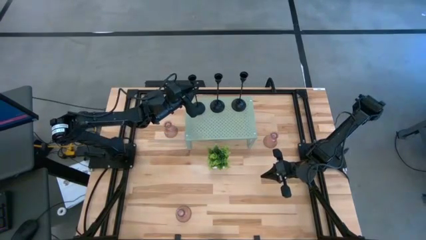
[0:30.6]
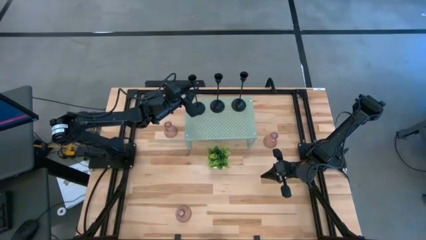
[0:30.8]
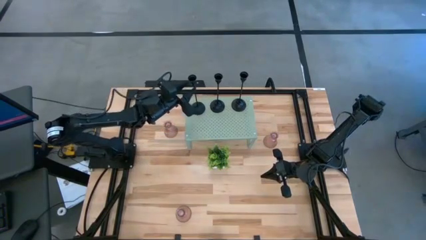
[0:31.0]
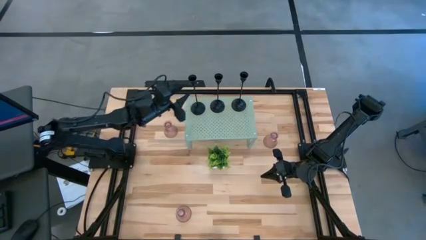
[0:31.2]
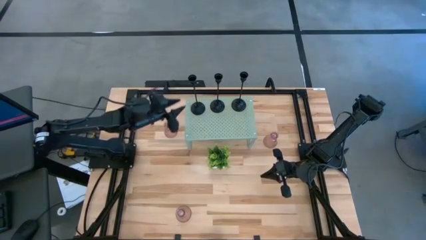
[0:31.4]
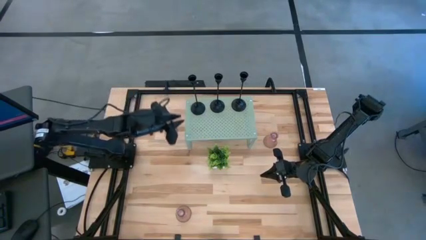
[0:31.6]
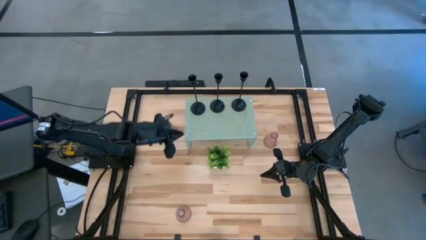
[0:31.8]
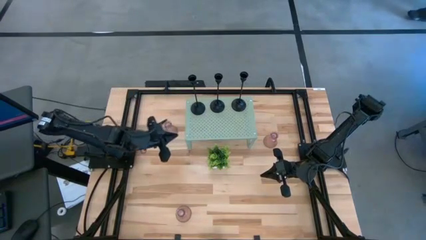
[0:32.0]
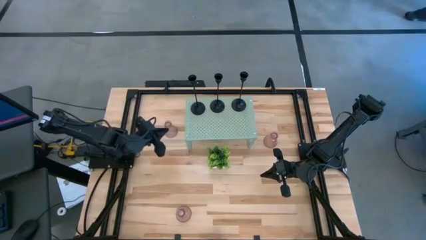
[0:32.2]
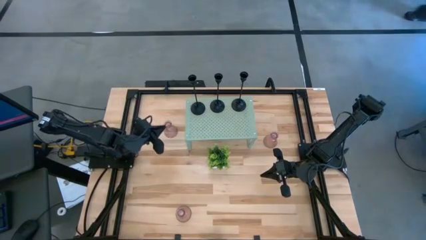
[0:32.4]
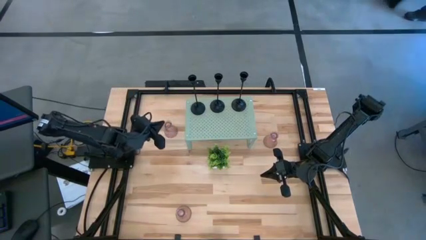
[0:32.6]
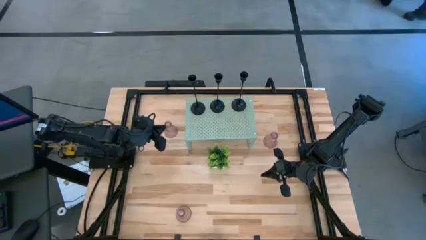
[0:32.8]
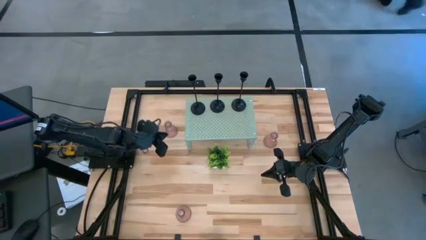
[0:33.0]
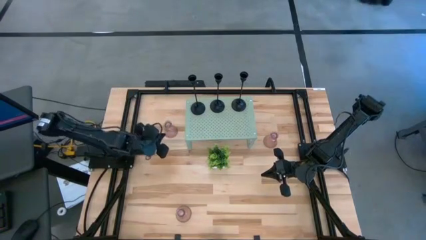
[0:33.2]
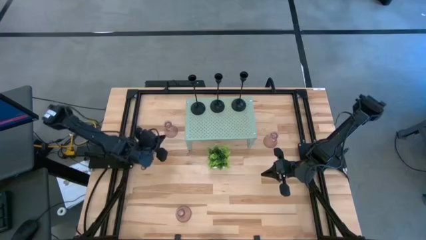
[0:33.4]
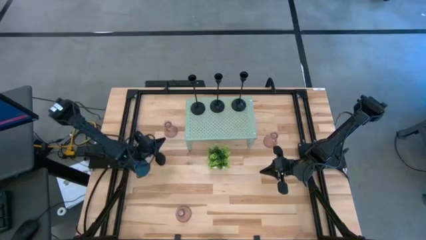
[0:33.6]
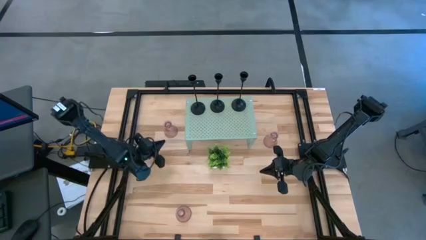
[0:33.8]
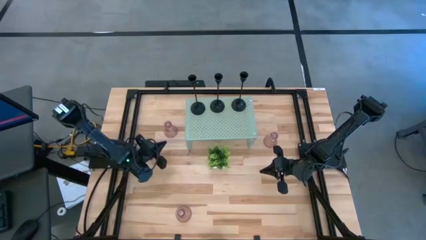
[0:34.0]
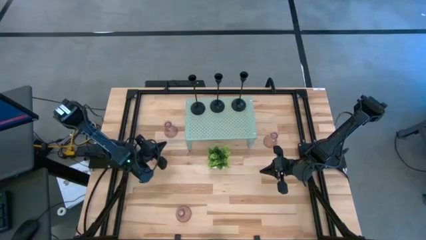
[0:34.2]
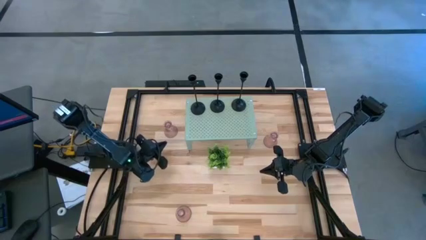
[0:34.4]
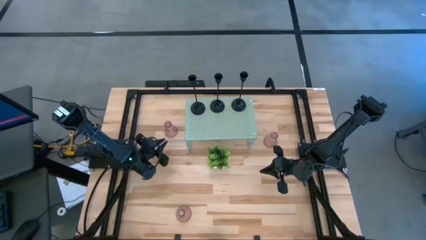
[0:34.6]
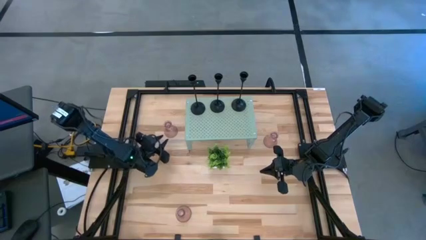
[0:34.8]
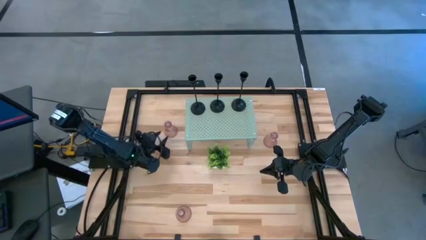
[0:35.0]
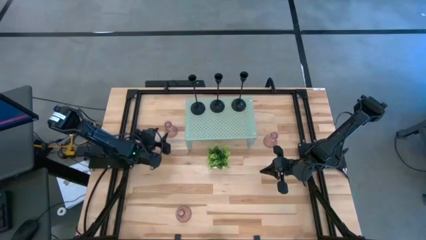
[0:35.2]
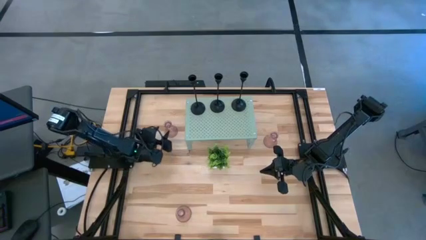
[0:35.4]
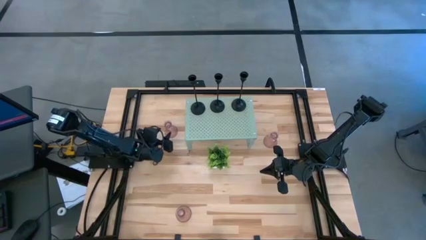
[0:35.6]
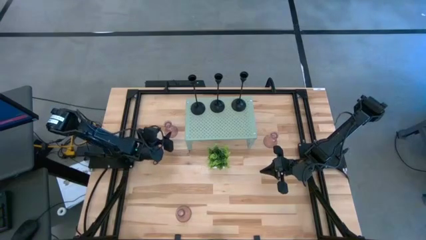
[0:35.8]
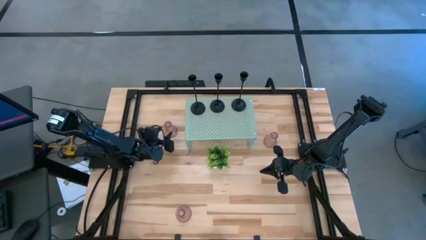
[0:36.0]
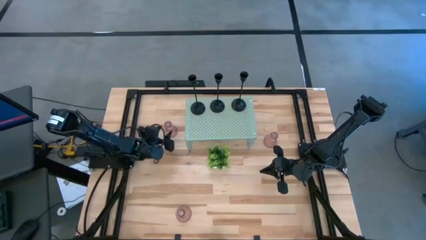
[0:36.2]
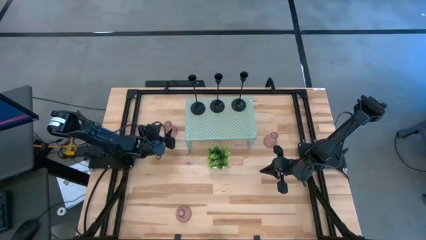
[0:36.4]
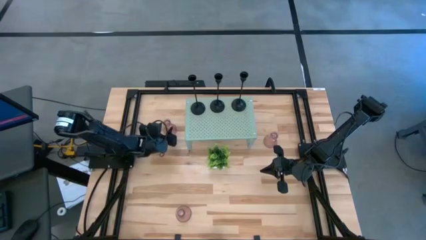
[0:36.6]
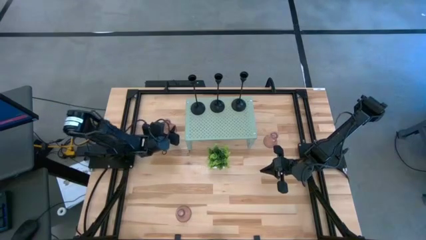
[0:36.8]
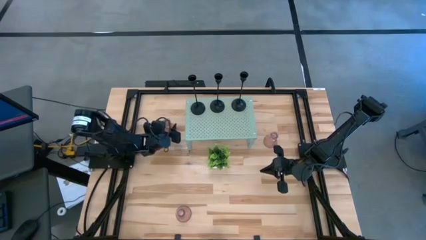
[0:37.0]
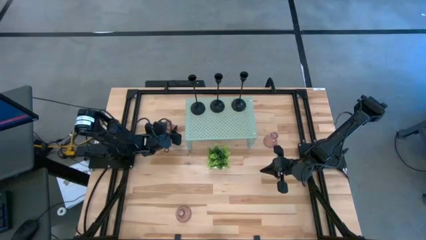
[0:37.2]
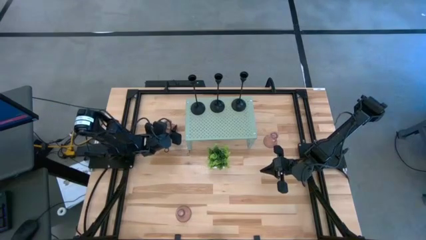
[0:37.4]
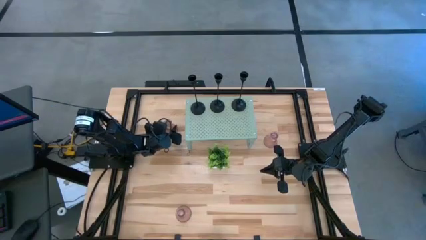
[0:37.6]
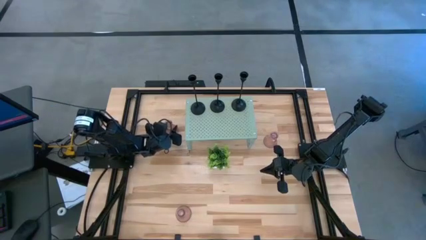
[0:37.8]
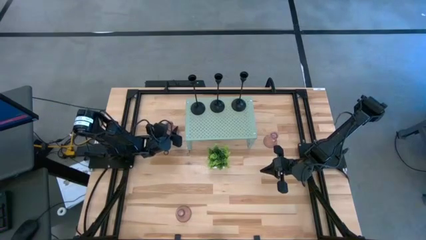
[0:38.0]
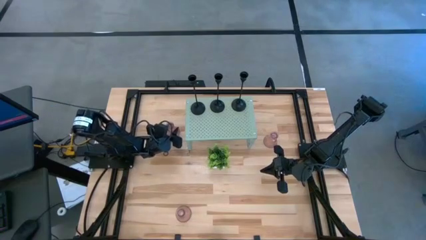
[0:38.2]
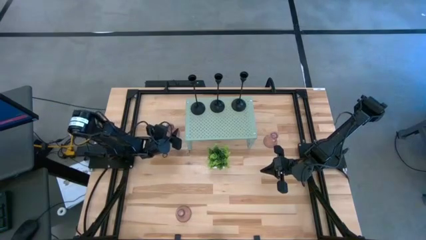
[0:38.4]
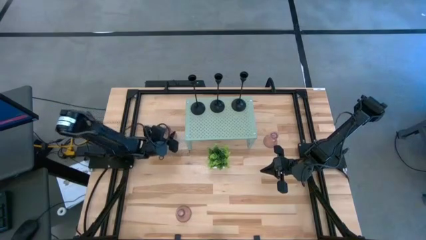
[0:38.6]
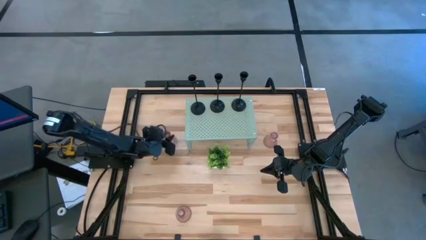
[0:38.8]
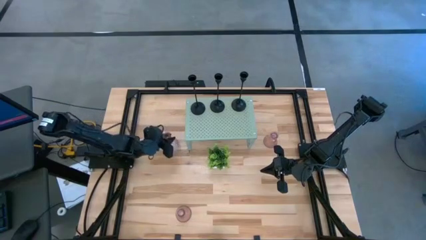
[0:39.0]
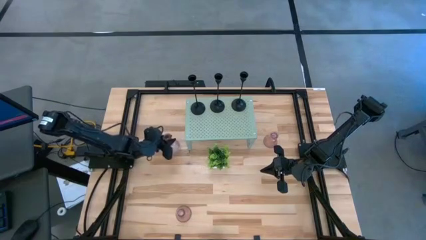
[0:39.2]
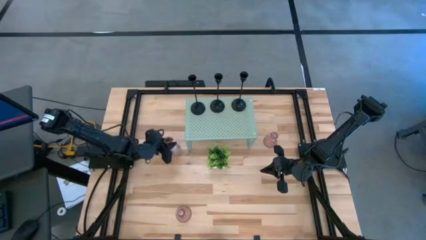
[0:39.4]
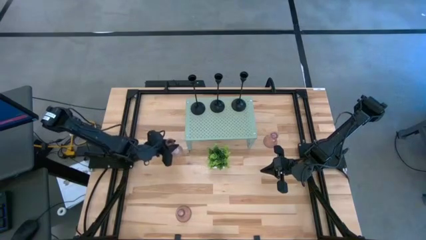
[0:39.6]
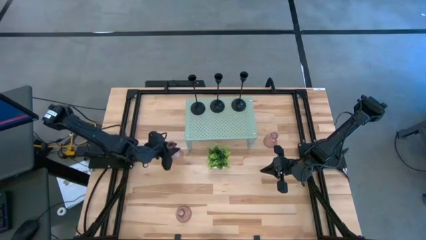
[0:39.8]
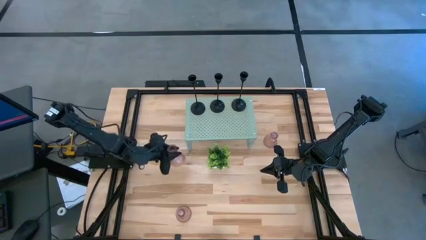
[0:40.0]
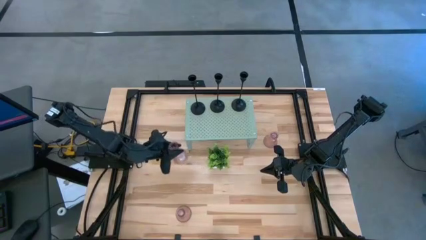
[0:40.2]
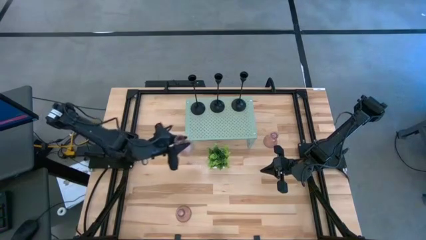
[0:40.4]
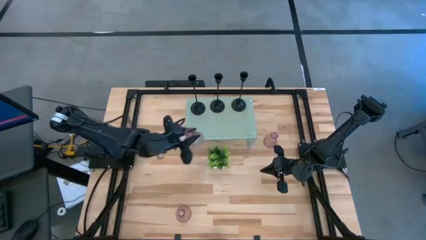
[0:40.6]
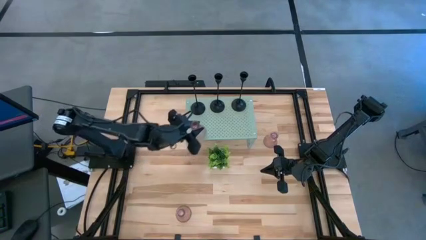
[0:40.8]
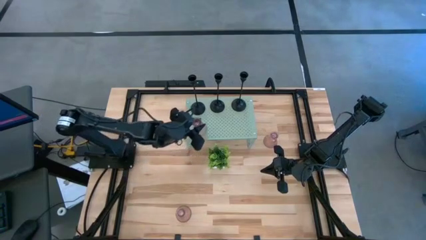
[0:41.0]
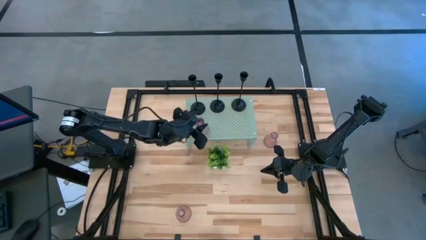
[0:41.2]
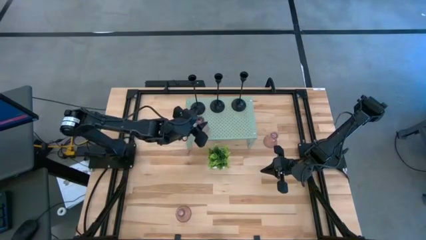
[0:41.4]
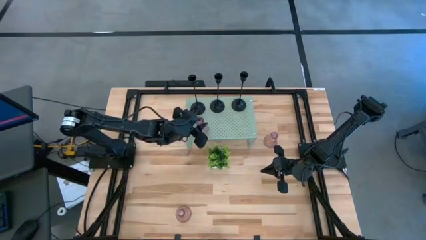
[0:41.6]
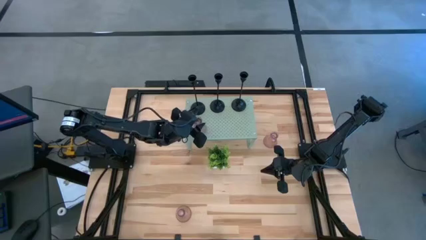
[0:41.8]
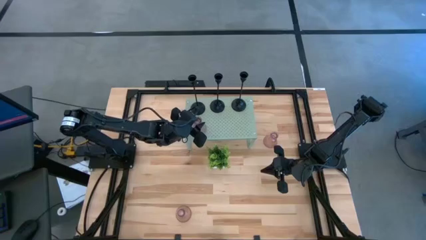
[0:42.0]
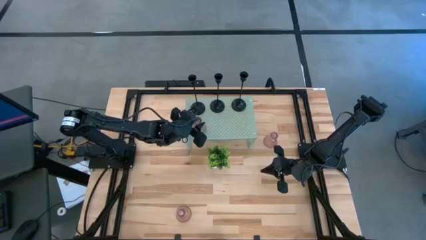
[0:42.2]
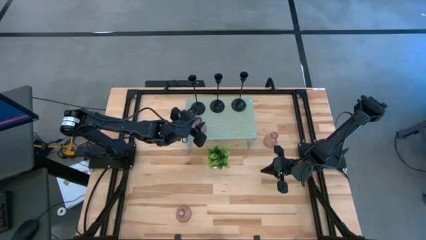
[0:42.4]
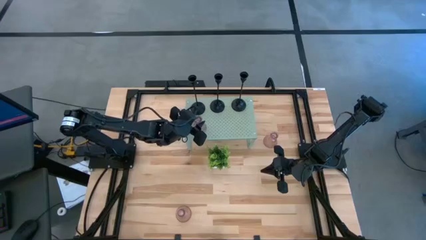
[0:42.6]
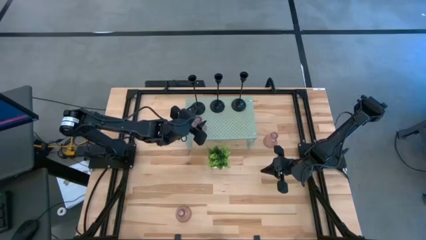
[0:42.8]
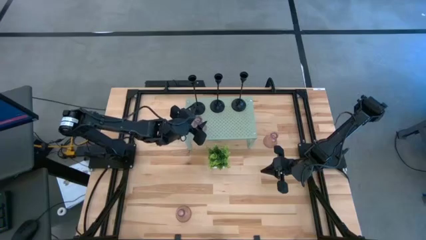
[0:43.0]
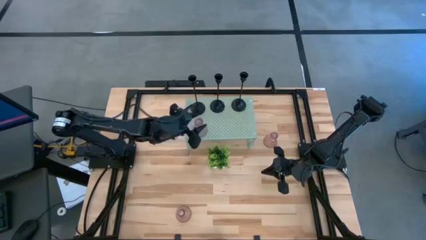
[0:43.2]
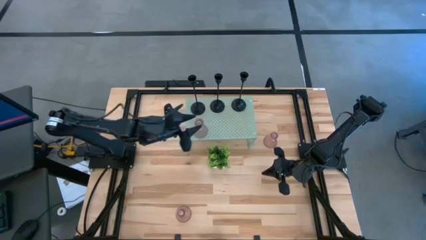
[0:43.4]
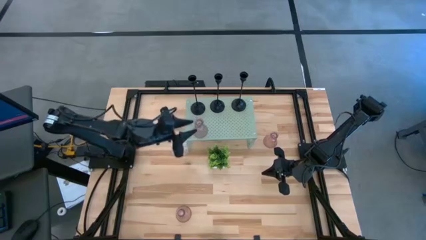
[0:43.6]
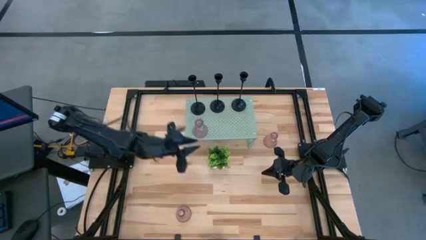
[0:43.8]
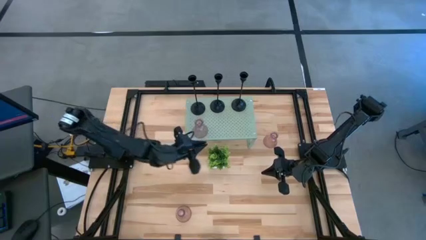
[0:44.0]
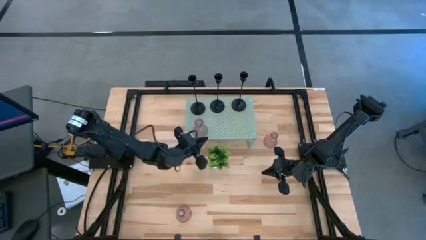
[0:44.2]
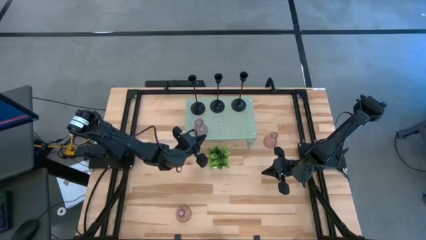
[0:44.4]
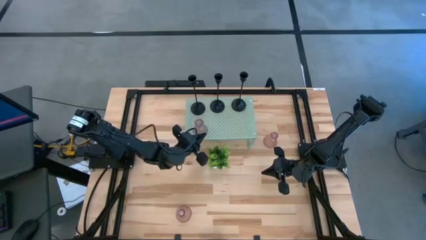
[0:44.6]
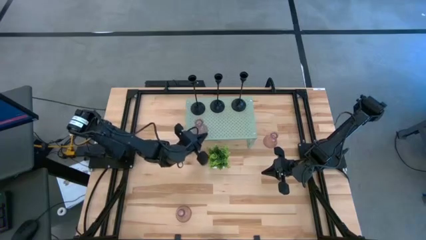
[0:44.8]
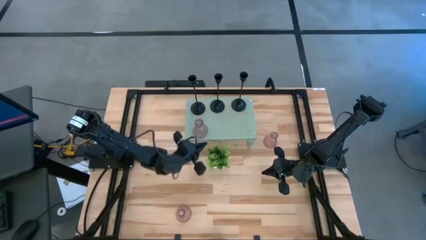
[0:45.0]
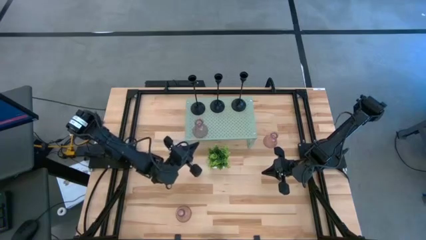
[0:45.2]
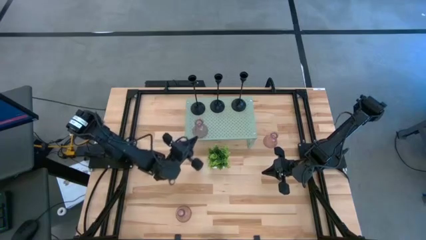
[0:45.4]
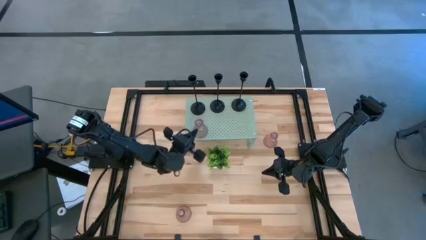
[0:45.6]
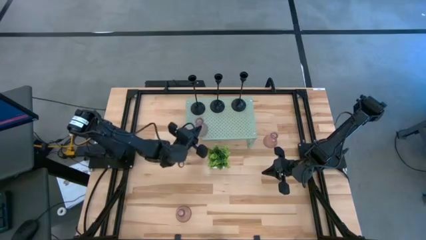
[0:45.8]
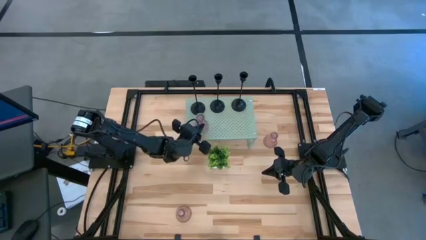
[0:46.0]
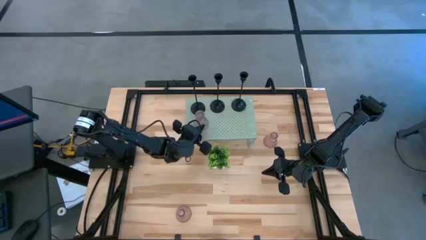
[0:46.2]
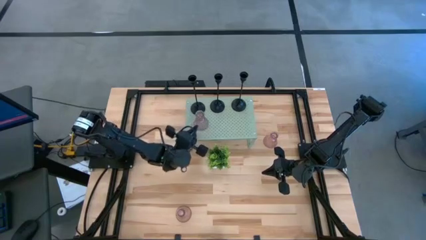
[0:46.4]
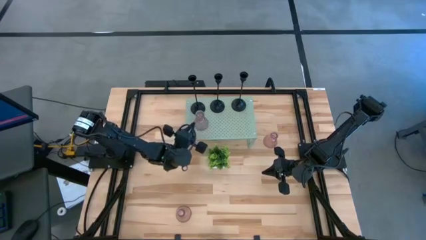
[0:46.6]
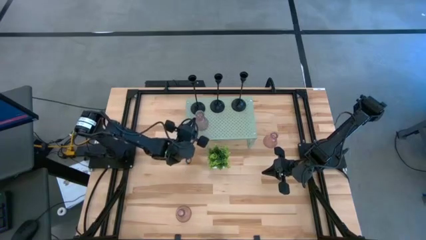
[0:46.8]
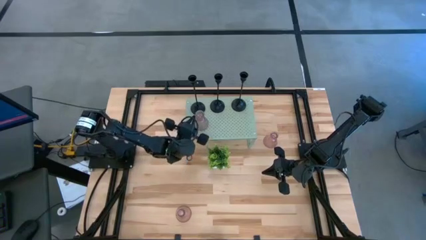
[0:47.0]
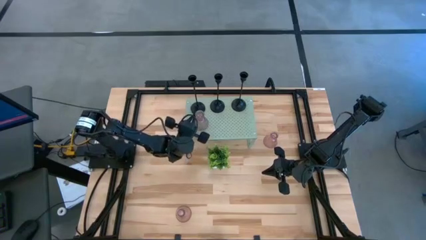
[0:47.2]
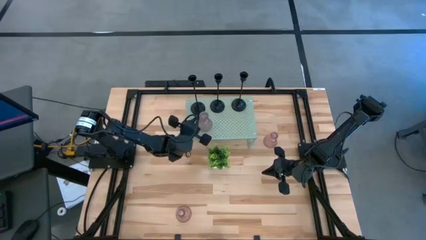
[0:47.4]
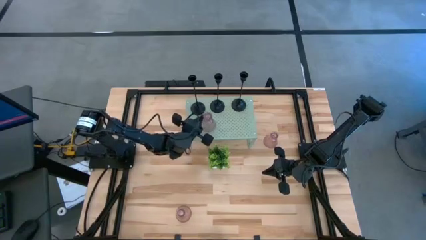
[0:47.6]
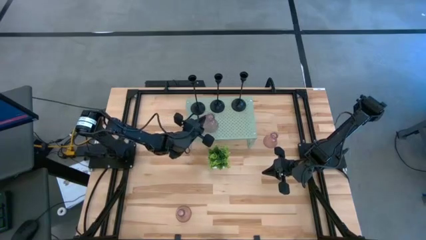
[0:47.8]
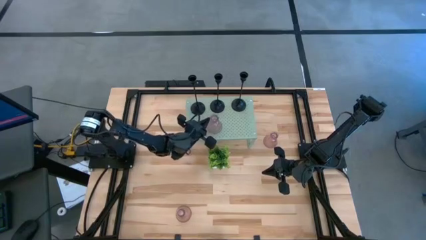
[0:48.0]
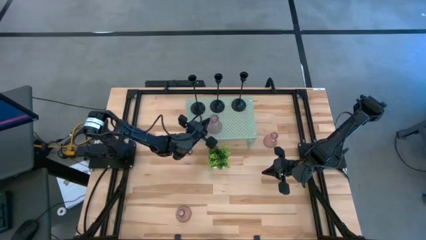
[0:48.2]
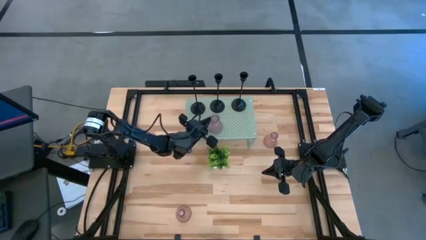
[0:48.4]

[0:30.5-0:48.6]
Task: Pick & Place candle stick holders
Put the top pink glass candle holder on the shelf
